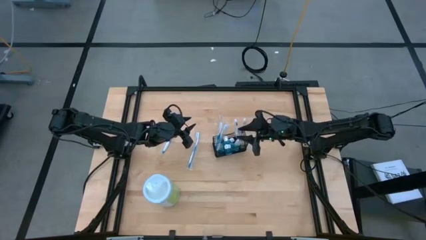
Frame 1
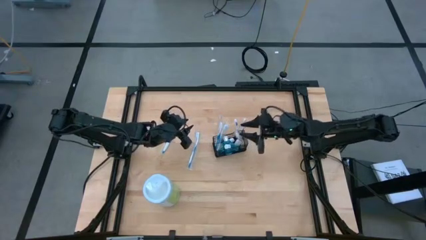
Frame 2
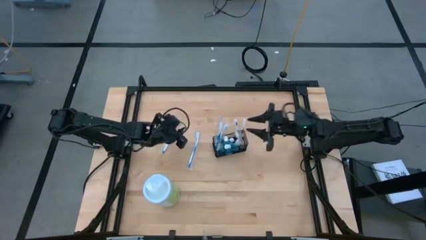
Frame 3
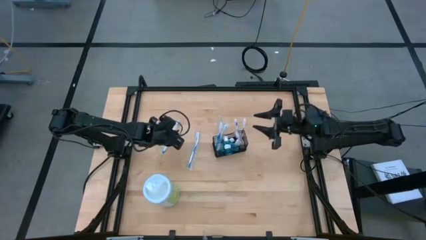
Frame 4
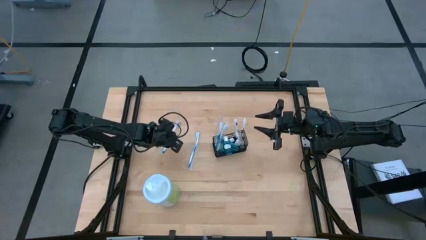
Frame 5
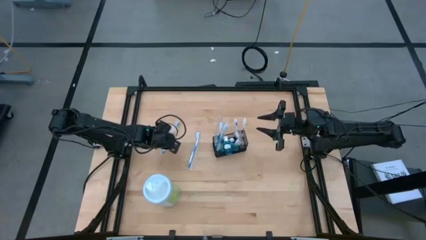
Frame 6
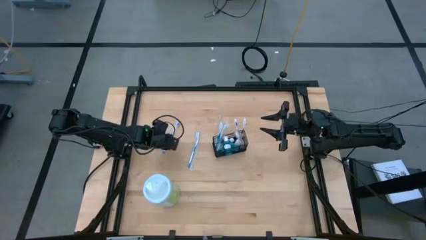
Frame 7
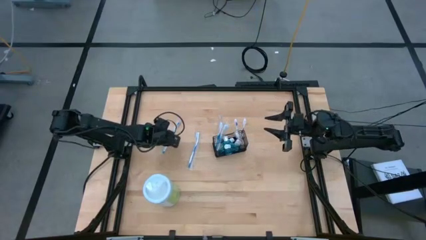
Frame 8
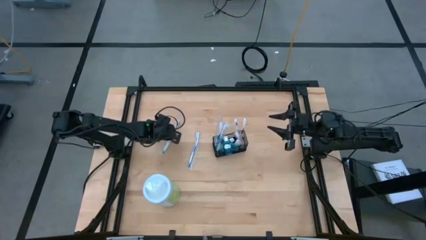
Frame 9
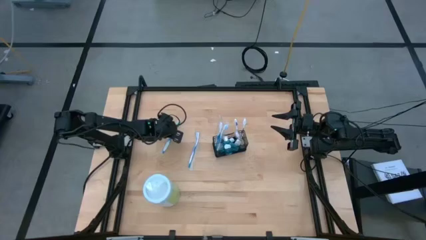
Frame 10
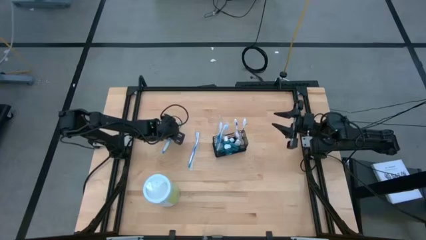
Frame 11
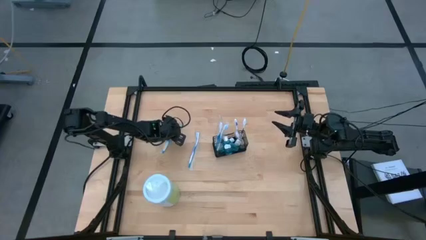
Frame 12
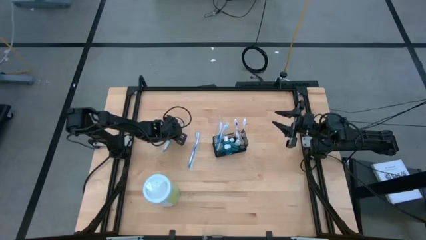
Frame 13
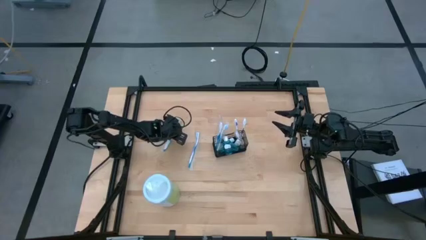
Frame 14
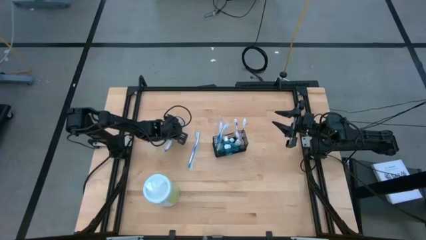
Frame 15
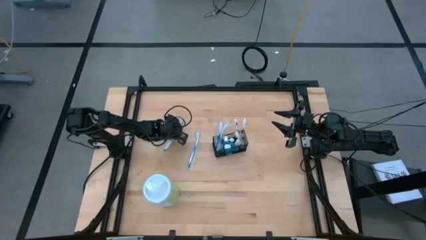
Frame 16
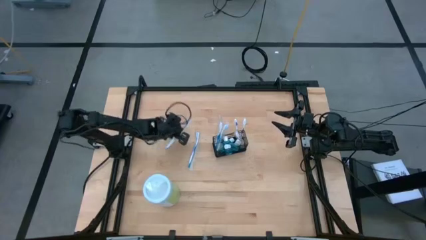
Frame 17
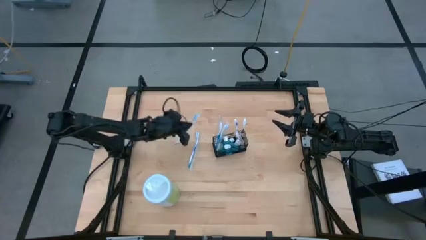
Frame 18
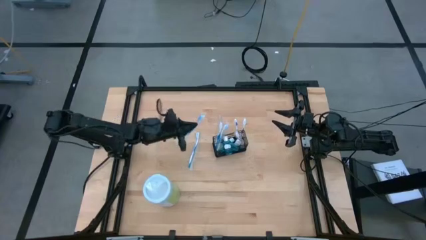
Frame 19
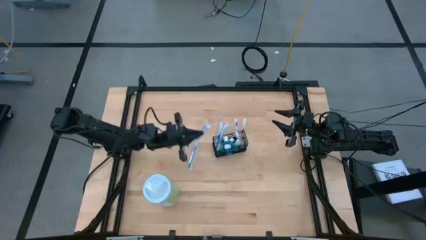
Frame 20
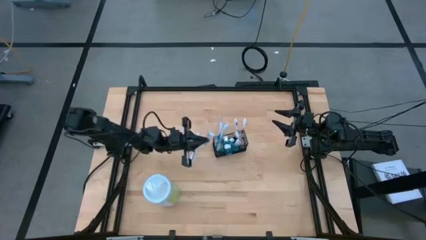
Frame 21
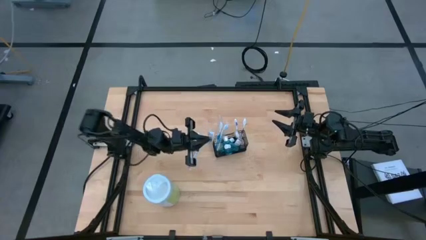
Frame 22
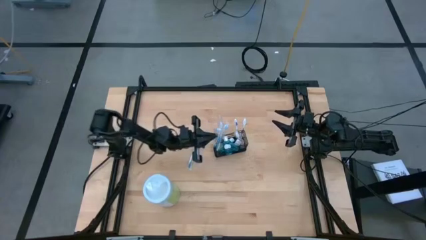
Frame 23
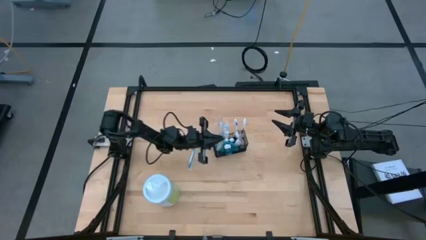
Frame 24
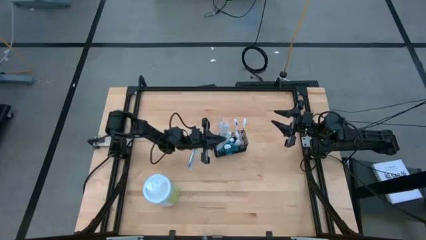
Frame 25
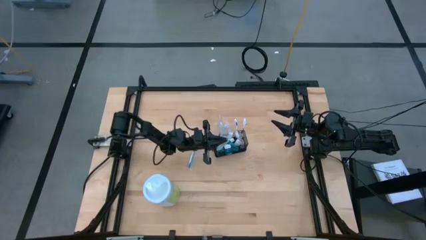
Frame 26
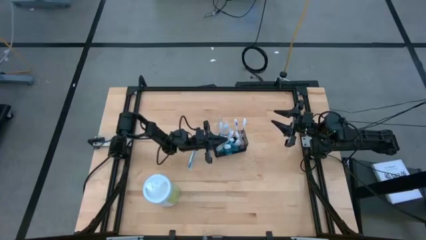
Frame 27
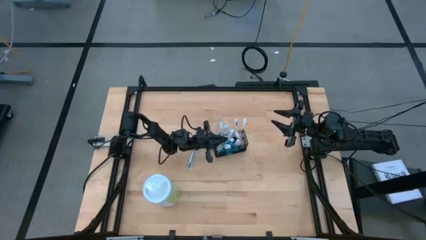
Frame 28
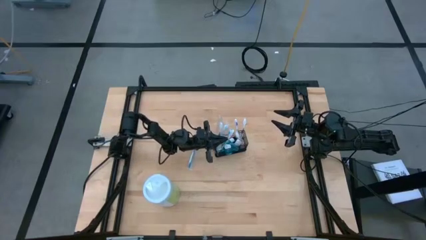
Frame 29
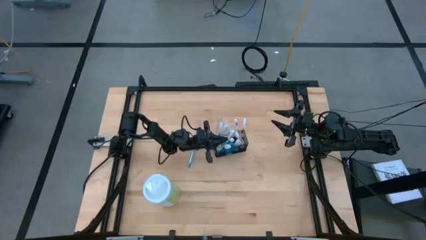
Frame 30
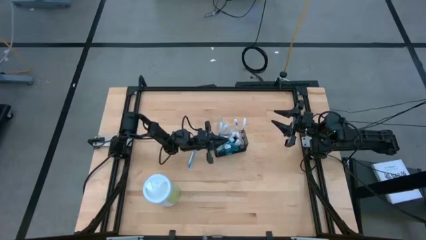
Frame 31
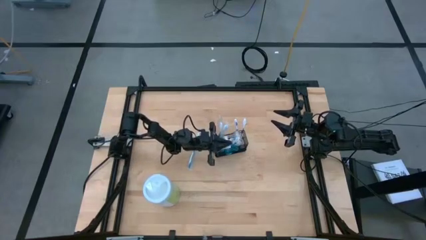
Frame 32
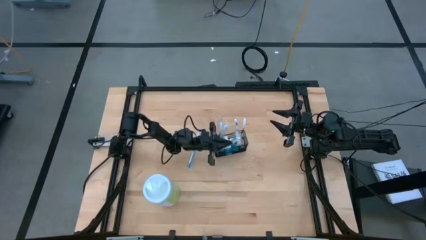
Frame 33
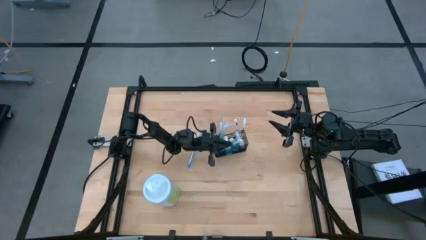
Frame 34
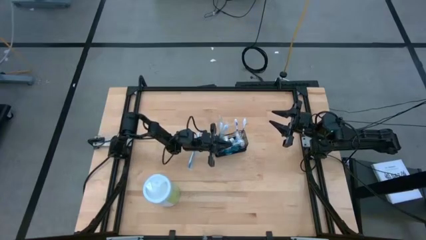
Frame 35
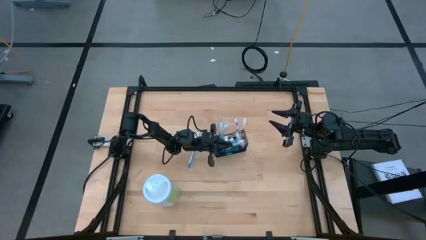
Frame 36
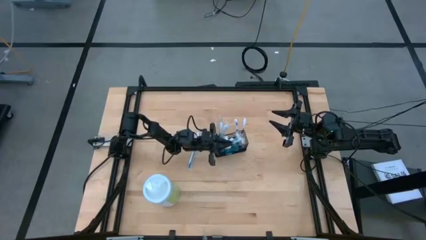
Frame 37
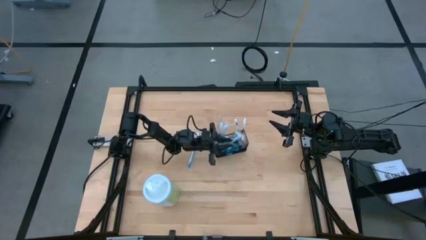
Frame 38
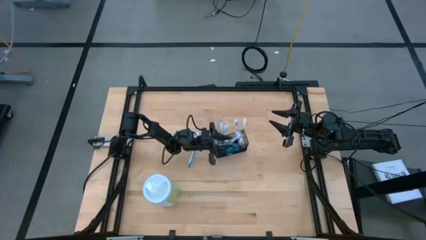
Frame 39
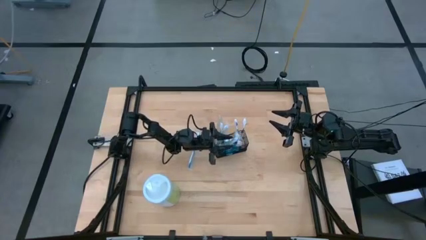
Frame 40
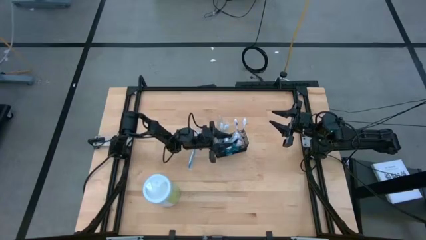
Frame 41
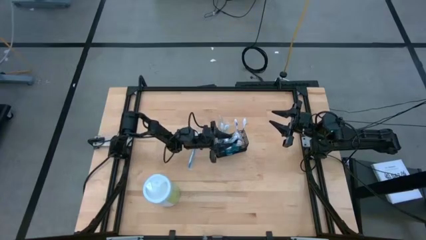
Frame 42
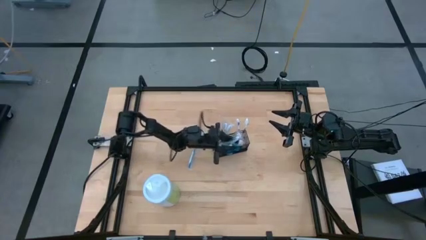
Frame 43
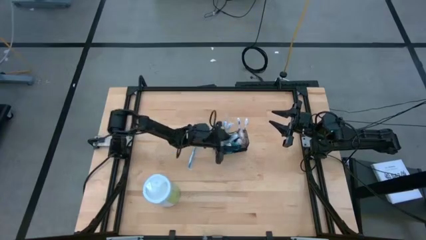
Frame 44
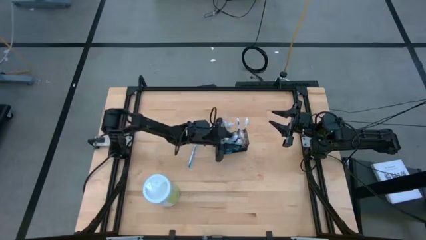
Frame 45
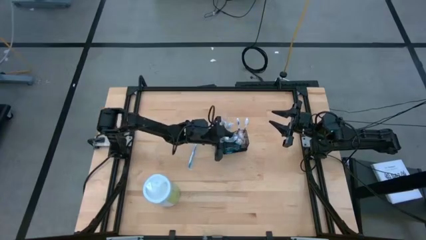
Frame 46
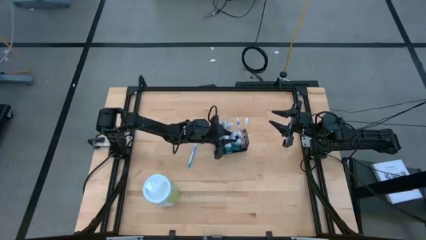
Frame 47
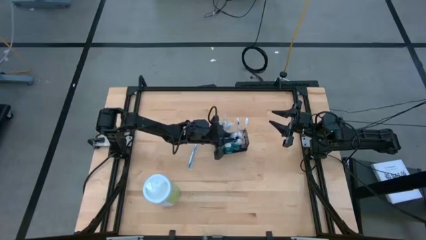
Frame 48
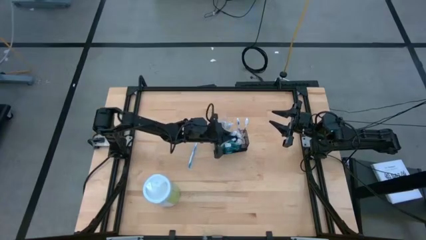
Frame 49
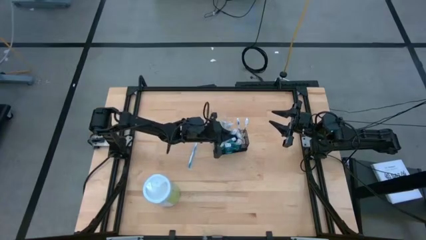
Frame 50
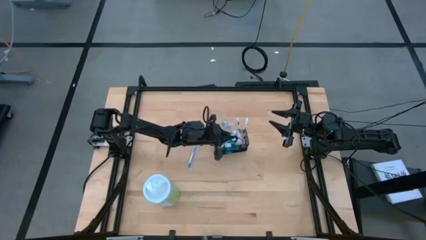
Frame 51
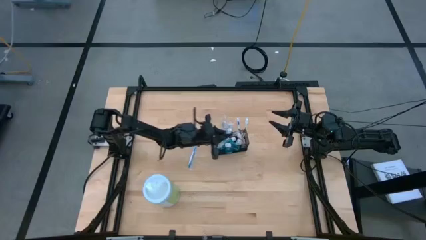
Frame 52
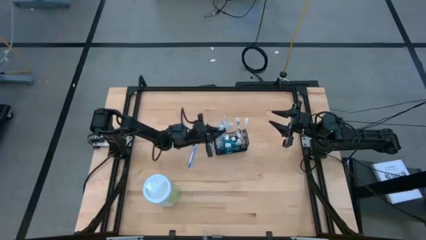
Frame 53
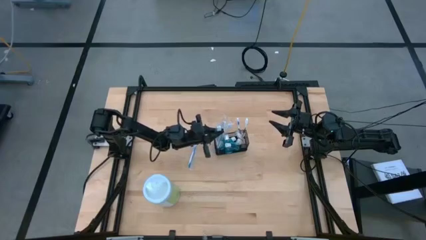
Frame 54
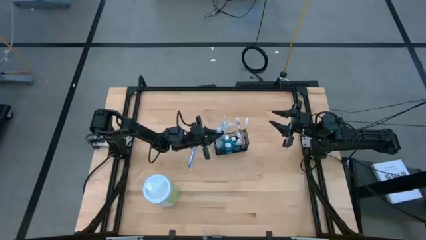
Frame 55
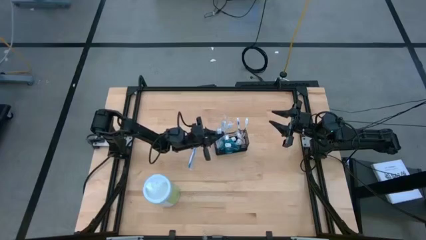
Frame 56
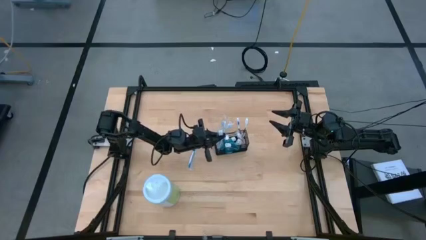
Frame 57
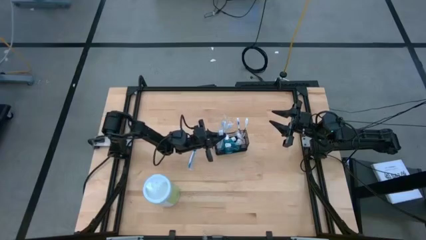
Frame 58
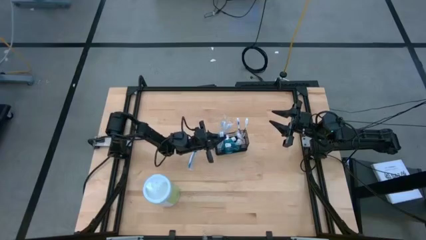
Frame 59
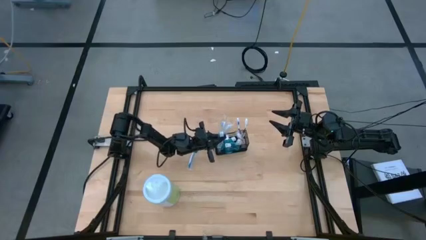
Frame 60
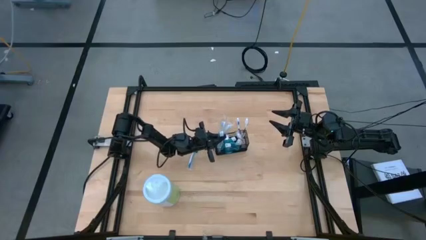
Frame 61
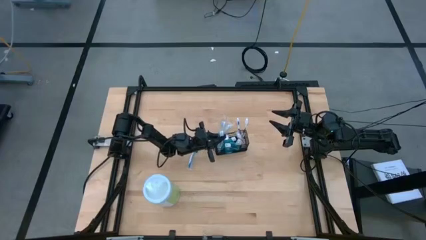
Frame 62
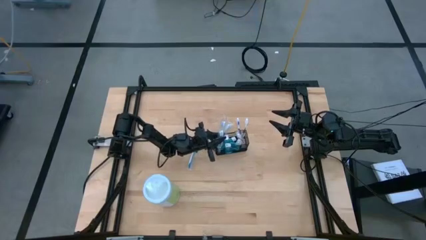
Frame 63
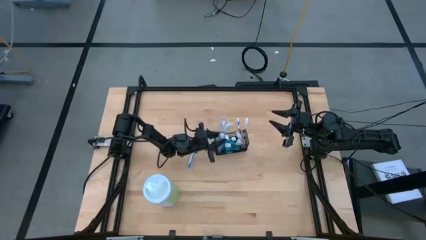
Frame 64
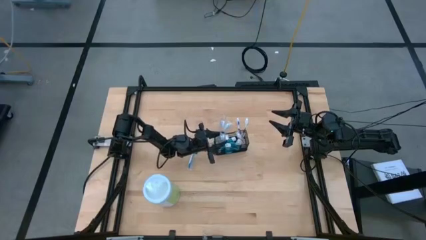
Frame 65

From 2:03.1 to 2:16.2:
Task: Pick & Place toothbrushing station
Put the blue toothbrush into the black mesh organizer

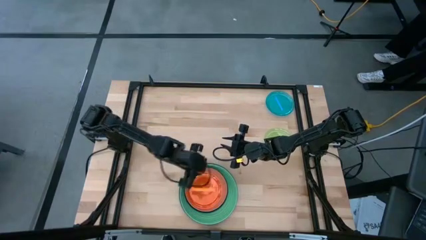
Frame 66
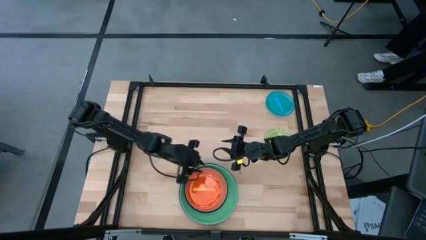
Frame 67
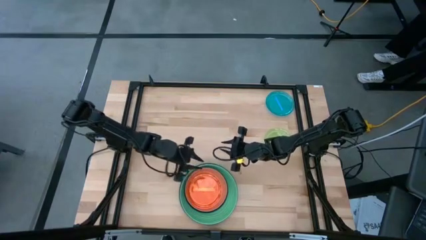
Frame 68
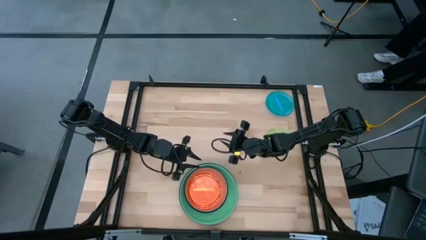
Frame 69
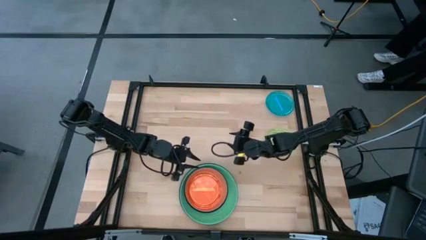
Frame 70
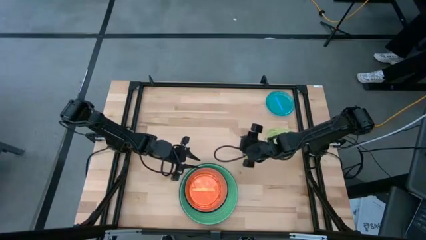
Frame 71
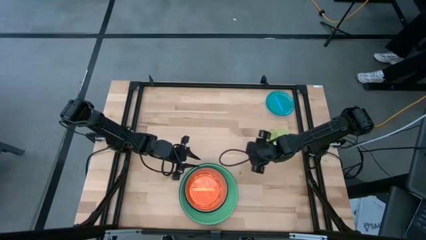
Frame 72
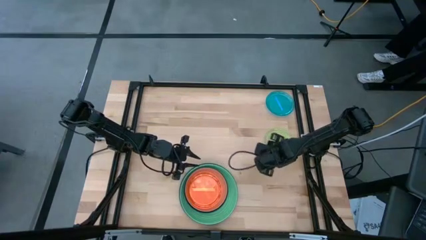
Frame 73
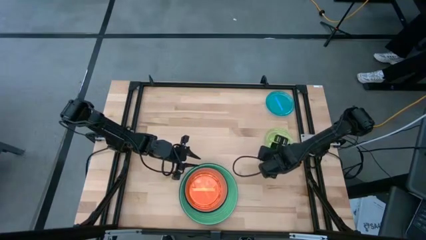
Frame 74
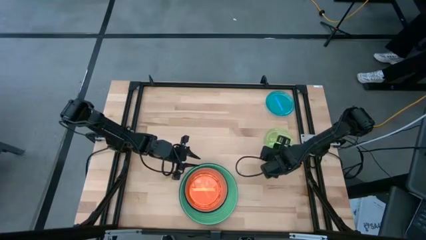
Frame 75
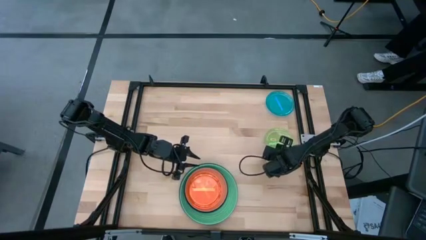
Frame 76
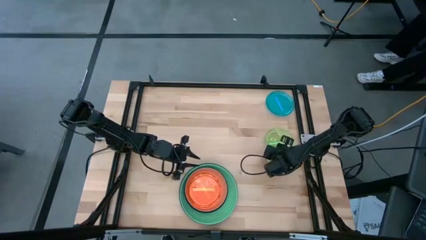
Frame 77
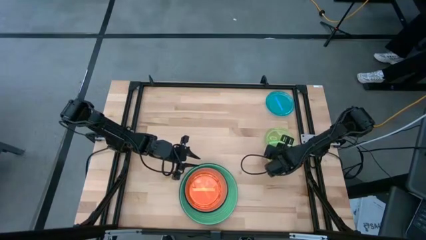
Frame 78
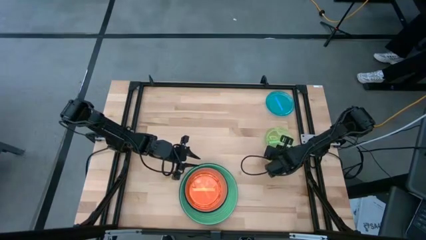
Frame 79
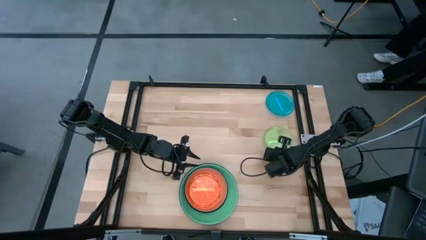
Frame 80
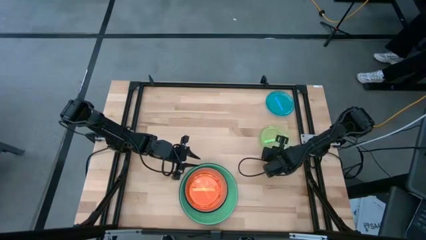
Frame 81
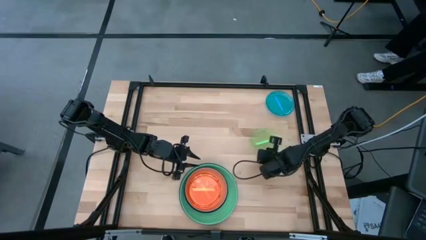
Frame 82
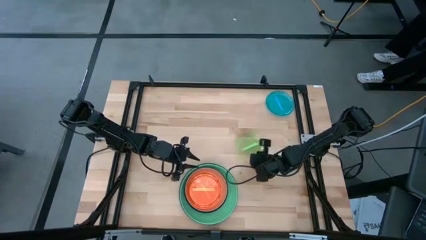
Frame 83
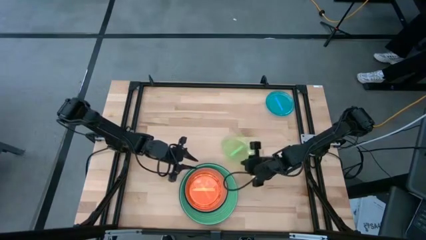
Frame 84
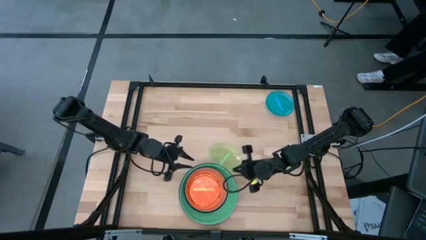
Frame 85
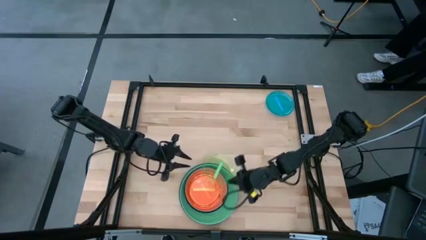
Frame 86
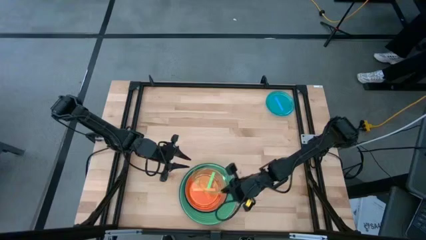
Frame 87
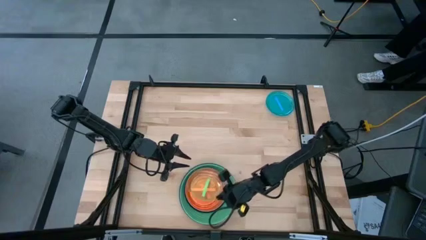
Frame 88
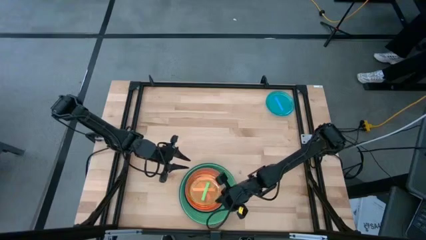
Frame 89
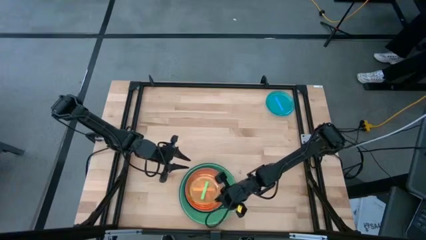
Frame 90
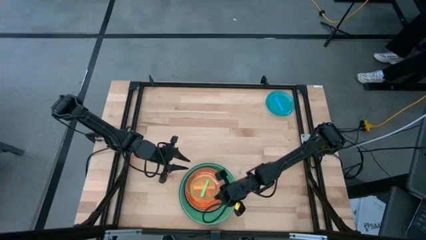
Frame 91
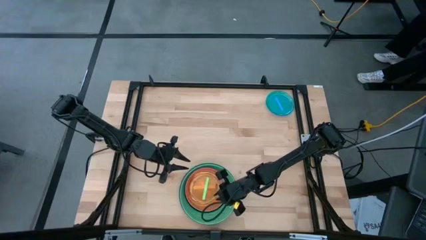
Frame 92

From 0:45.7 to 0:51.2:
Task: Stack plastic plates
Stack the green plate on top of the orange plate
